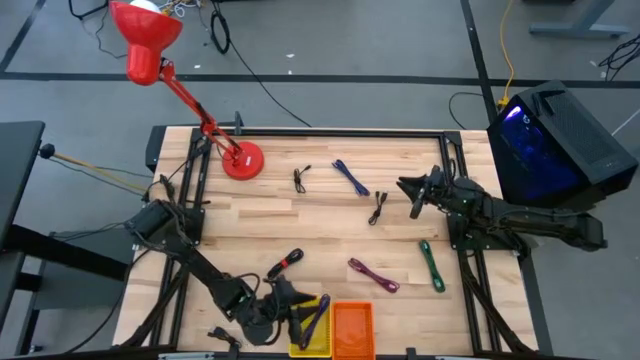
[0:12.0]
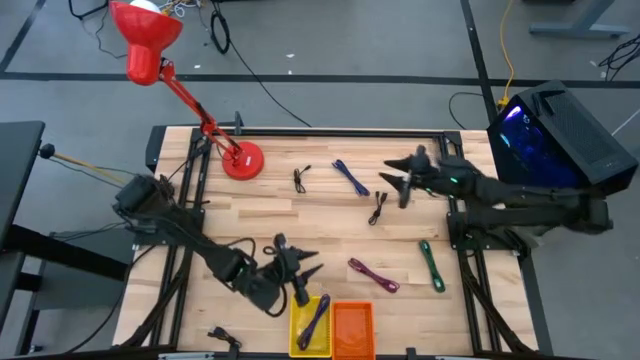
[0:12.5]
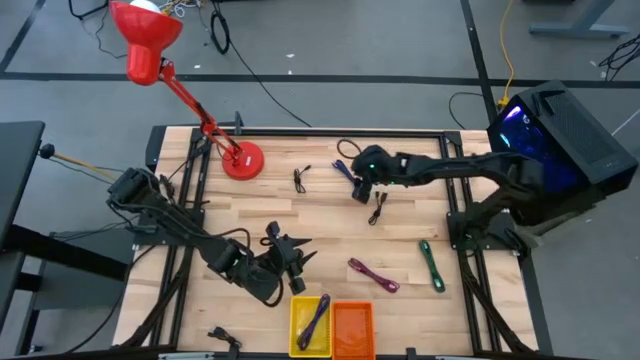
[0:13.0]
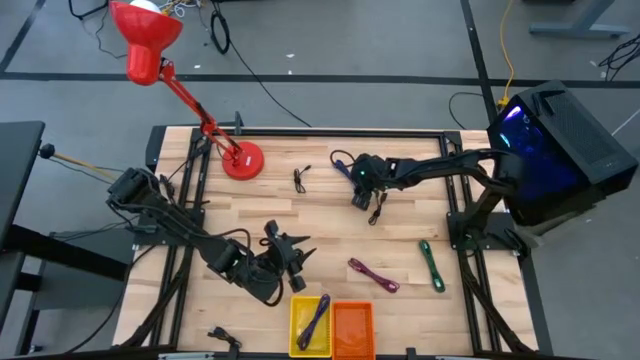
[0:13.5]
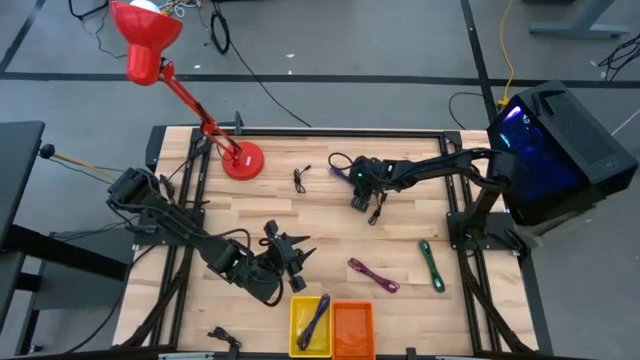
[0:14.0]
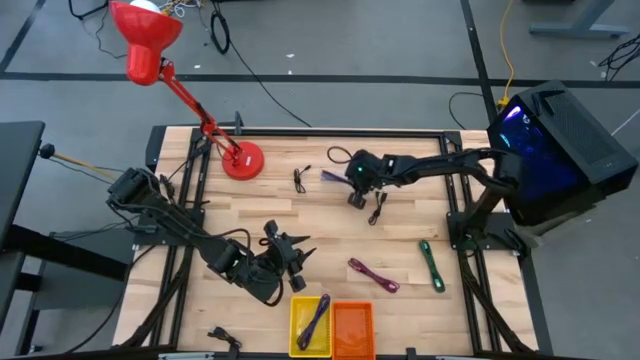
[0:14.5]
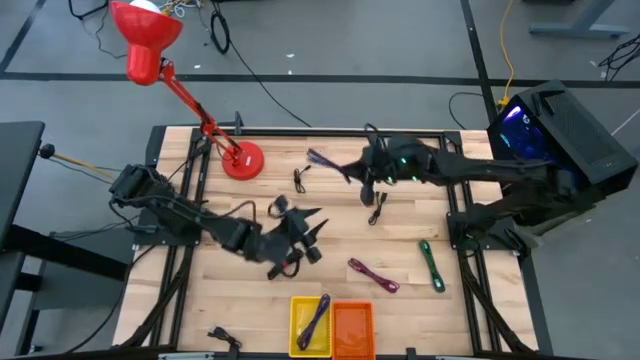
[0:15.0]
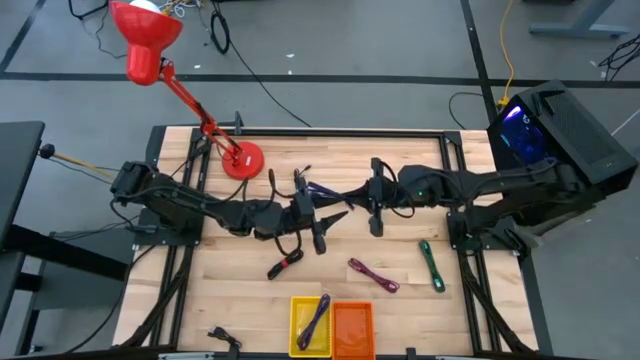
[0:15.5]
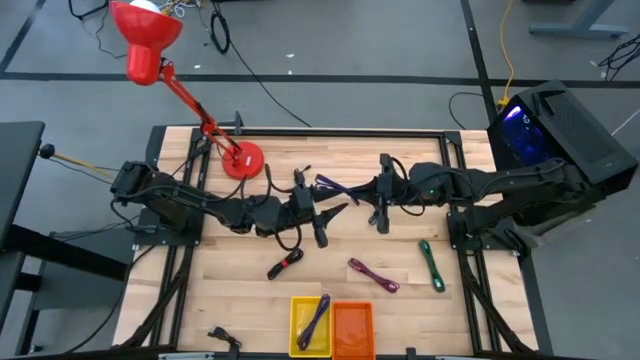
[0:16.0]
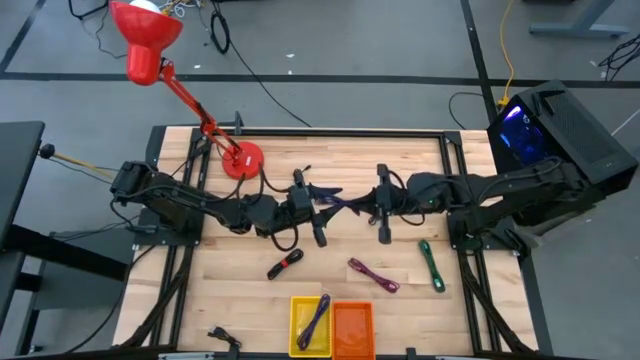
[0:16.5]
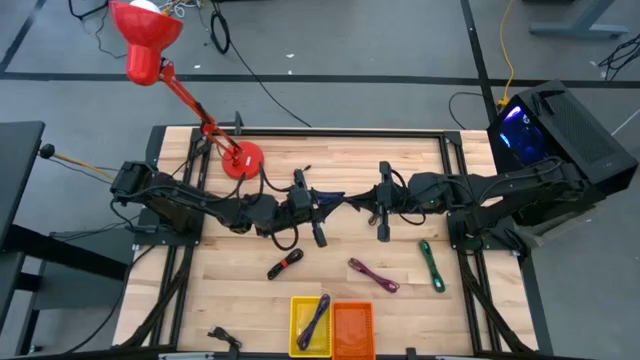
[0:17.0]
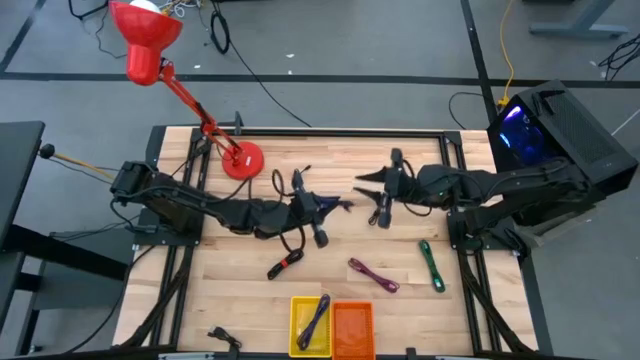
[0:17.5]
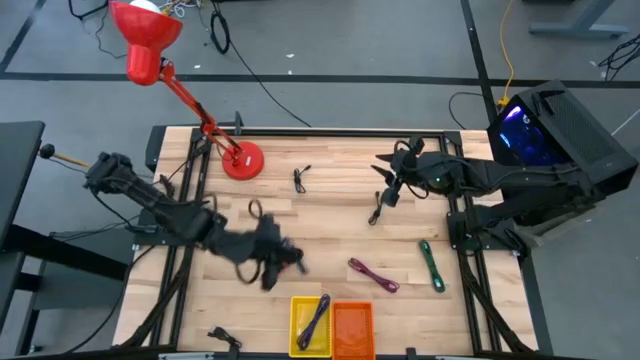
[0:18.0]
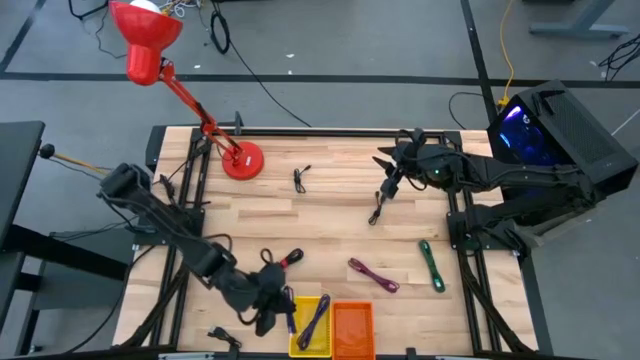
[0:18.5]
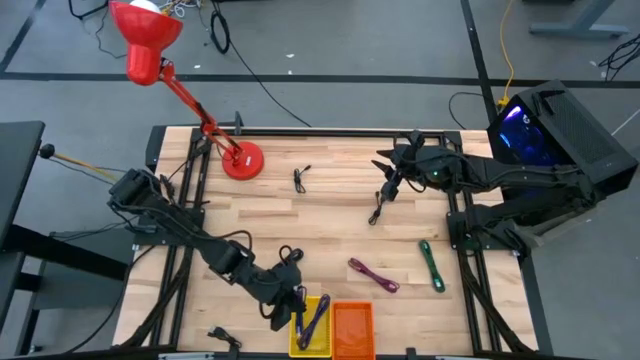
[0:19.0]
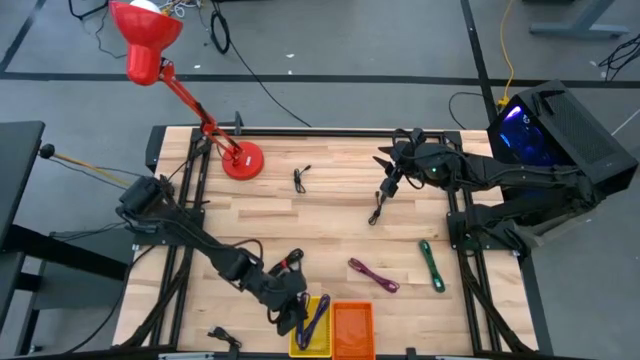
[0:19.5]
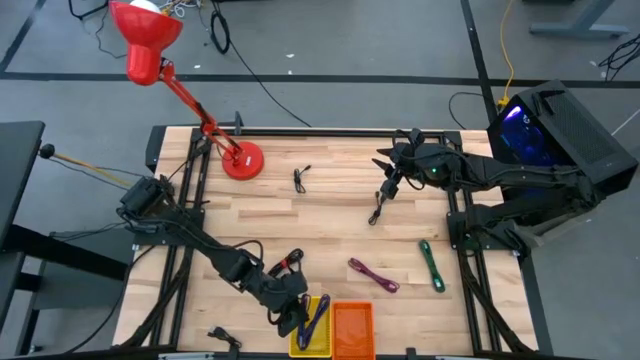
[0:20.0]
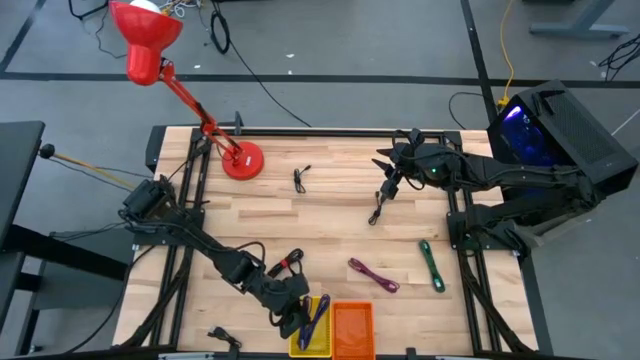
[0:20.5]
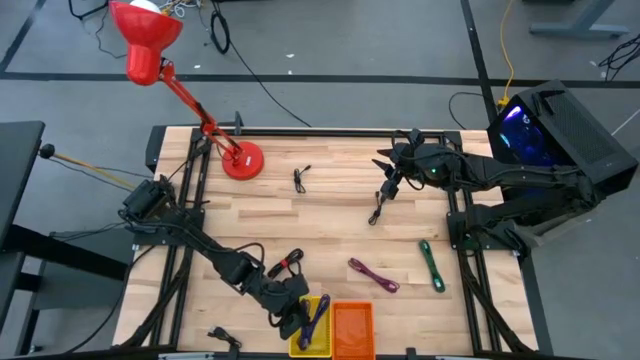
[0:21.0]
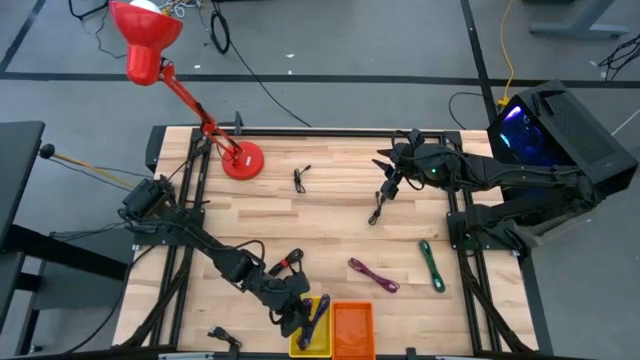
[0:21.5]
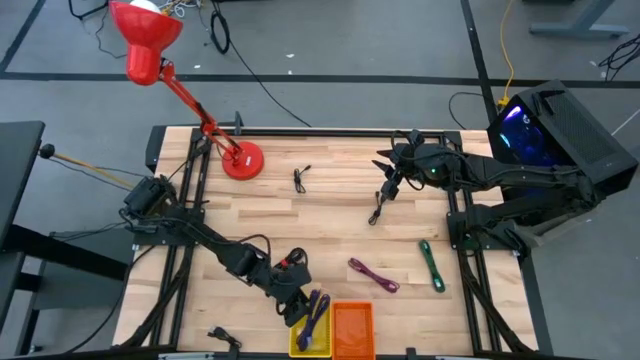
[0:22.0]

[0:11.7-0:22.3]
Task: Pick & Place USB Port
Put the blue charger cable into the yellow bin

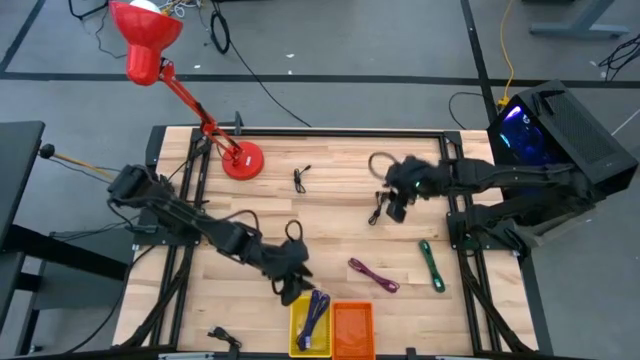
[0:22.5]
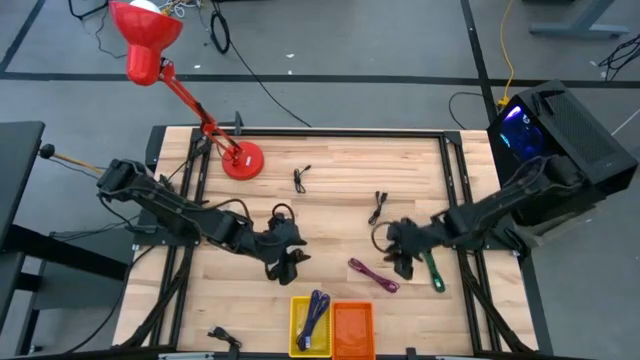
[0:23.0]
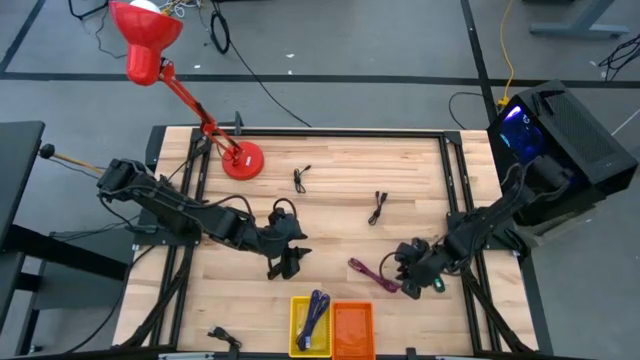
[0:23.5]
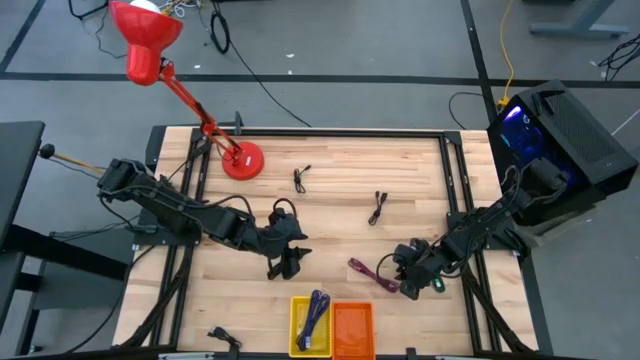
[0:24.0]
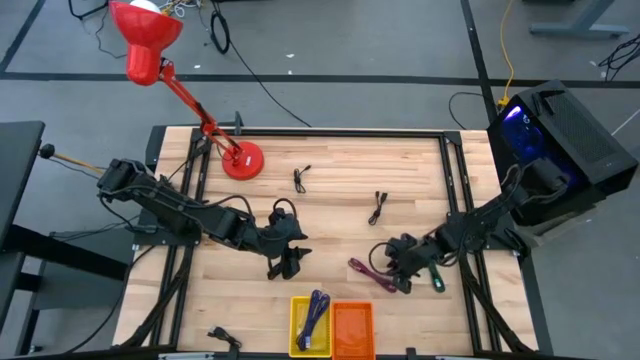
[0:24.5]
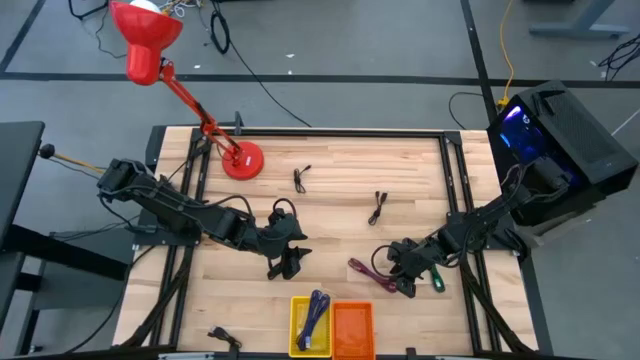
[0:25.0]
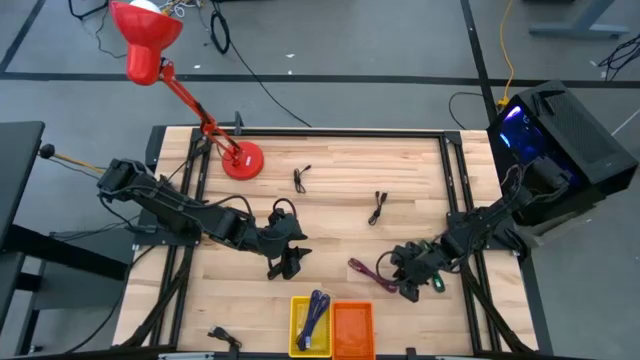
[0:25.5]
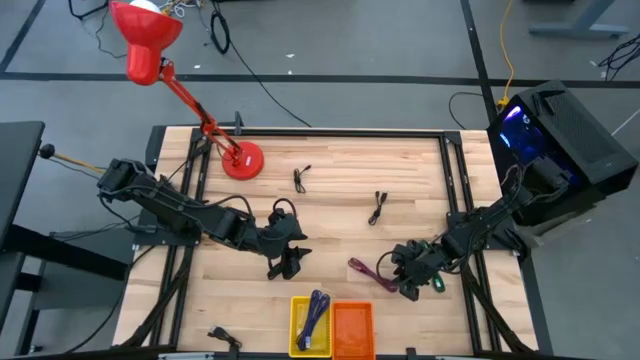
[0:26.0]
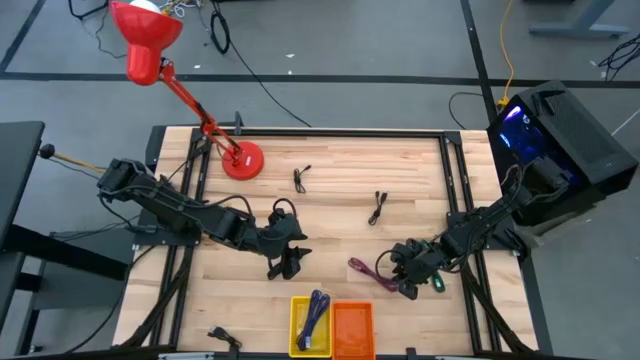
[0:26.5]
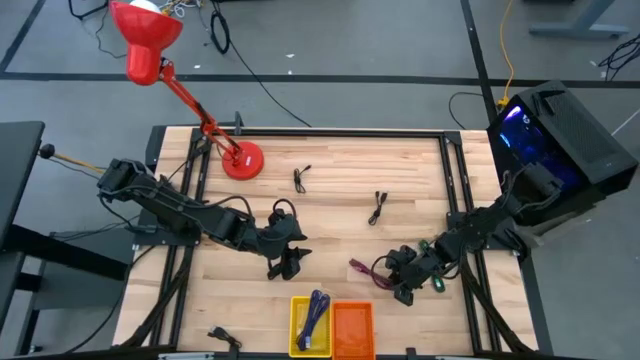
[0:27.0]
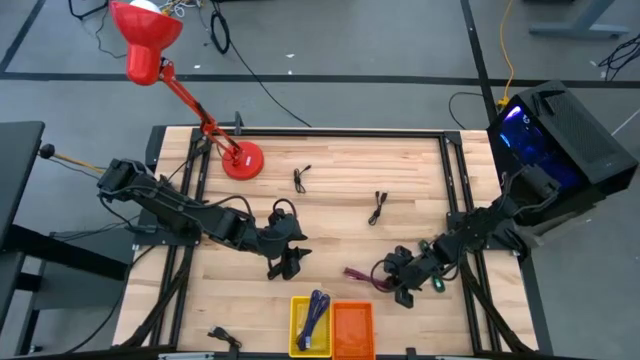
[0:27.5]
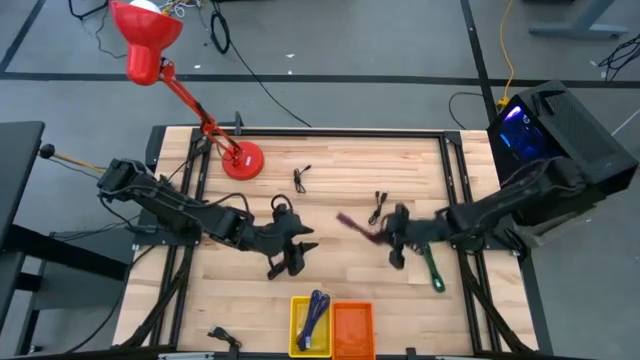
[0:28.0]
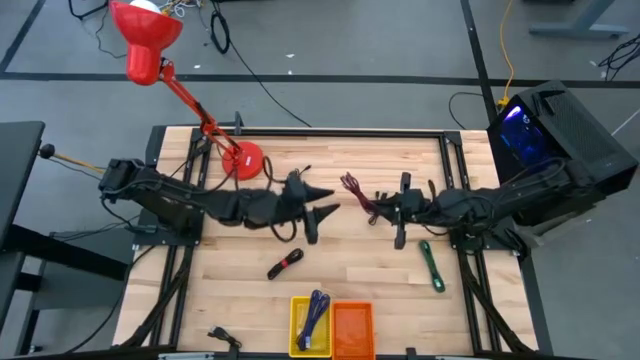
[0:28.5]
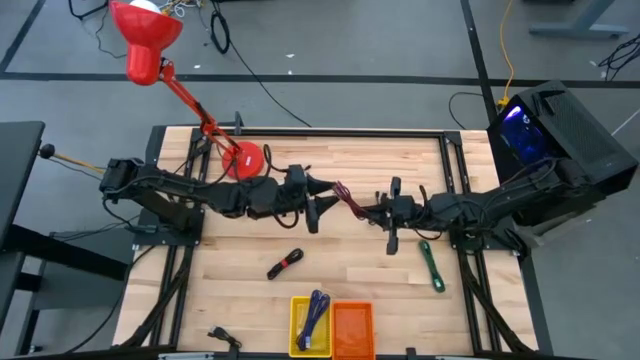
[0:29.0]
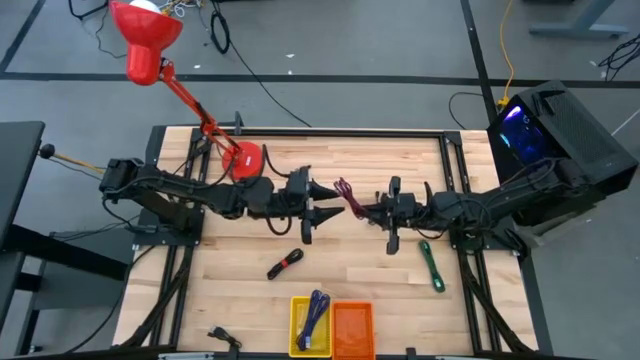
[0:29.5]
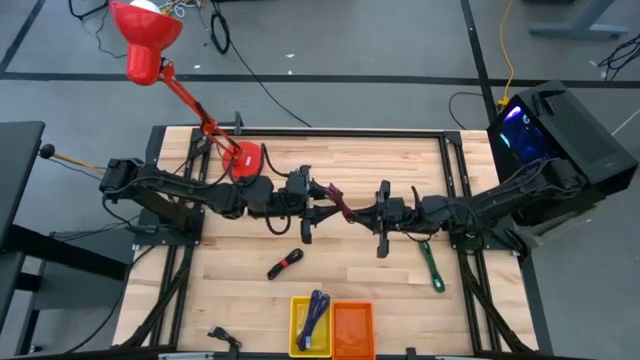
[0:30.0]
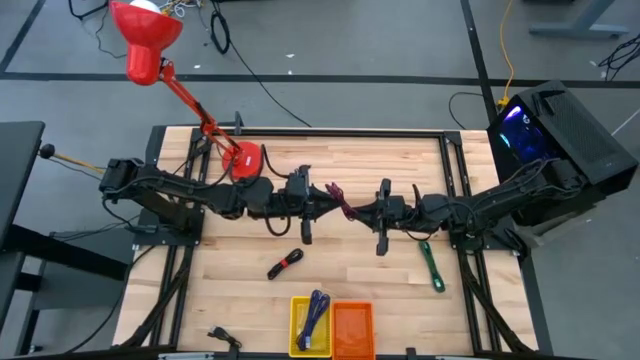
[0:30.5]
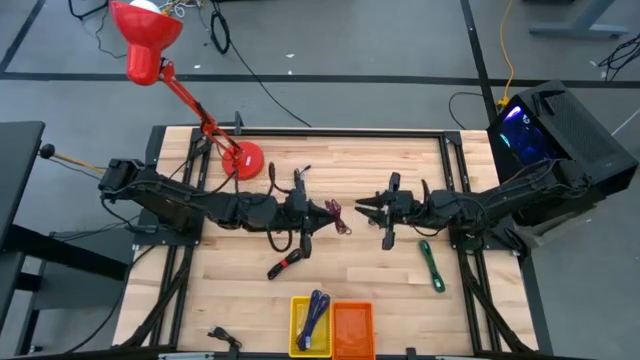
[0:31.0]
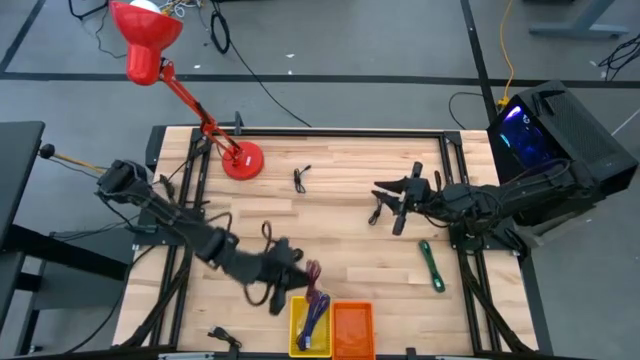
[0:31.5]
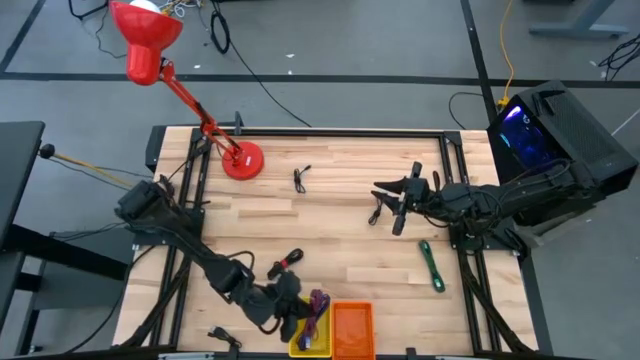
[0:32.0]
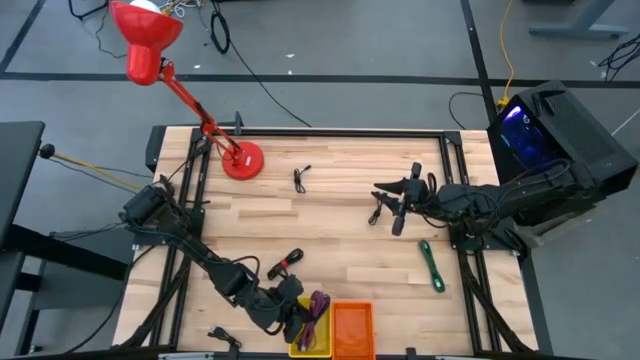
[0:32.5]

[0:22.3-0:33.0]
Put the pink charger cable into the yellow bin

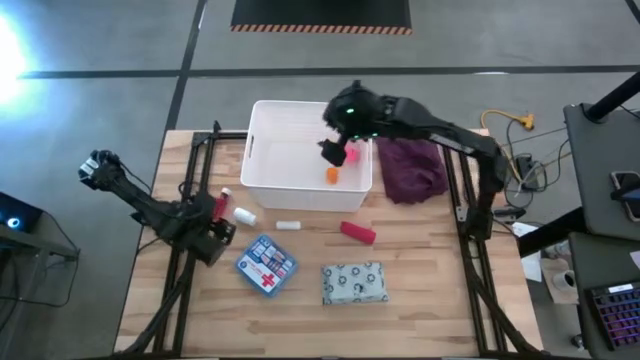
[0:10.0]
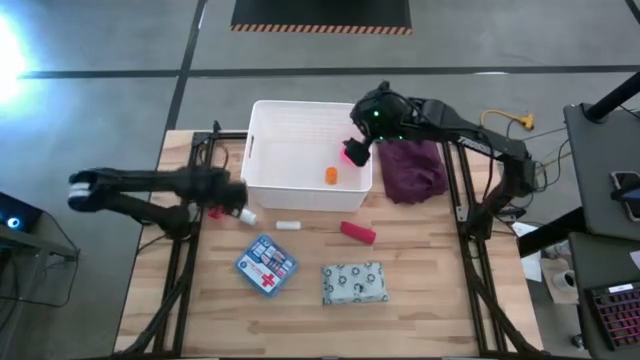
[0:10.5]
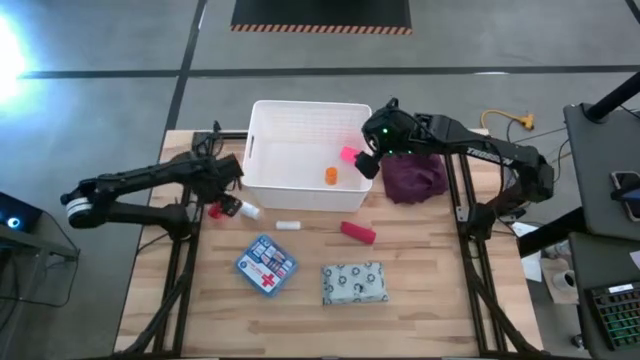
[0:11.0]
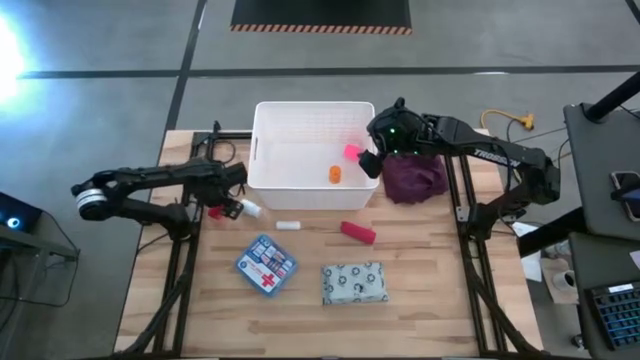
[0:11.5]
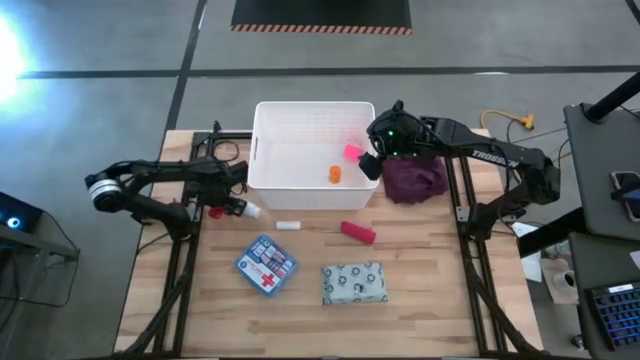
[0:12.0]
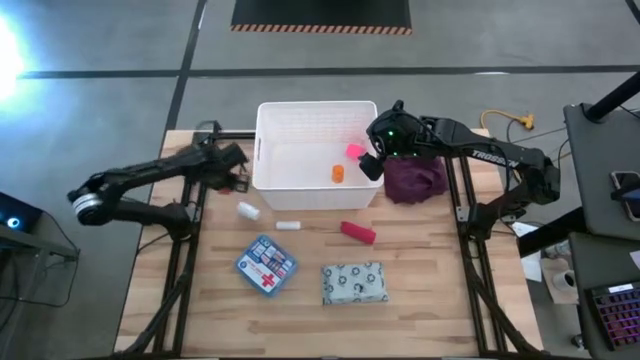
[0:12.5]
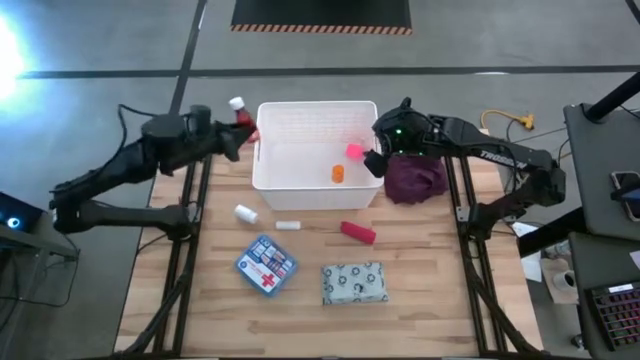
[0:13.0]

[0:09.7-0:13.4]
Task: Pick & place medical supplies in basket/bin
Put the red plastic bottle into the white bin
